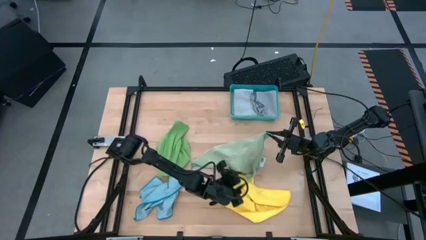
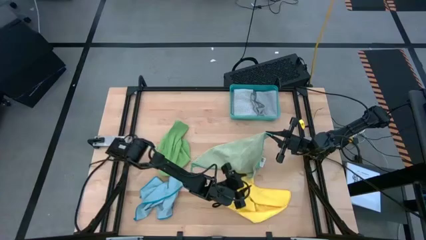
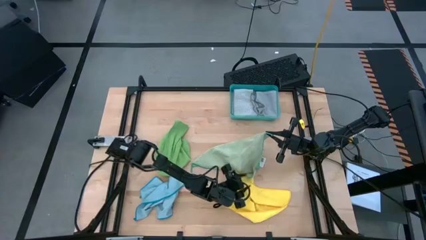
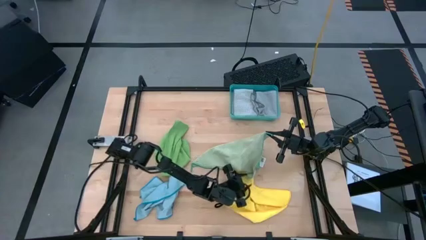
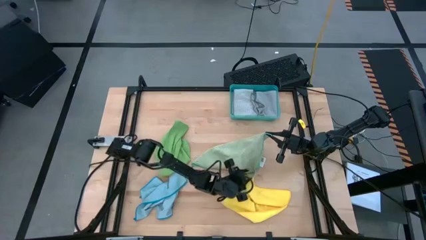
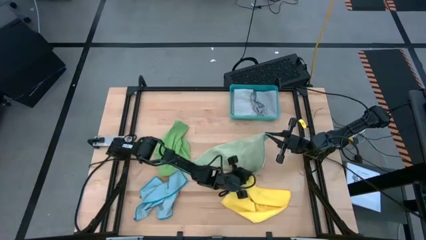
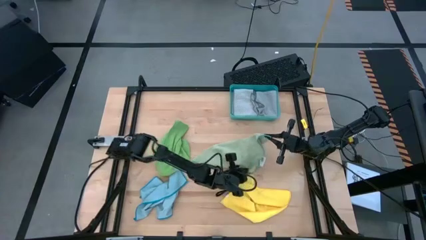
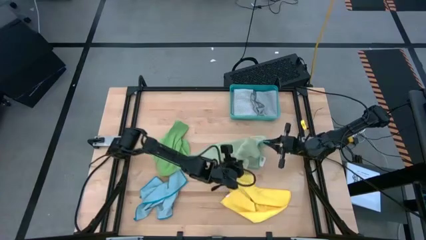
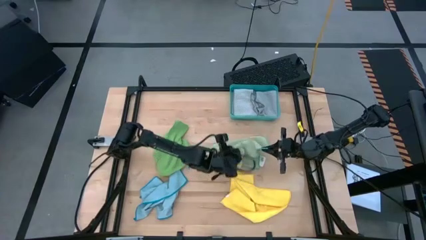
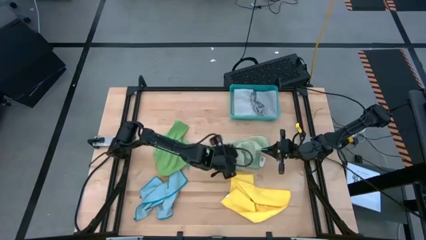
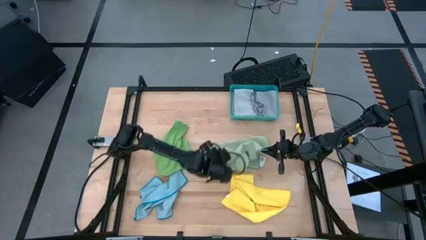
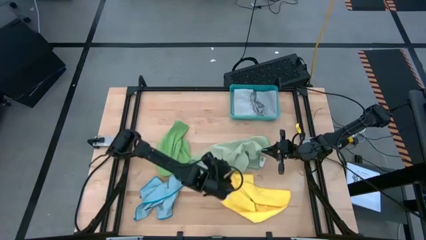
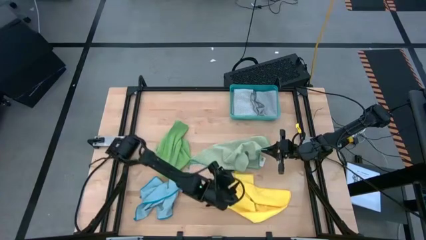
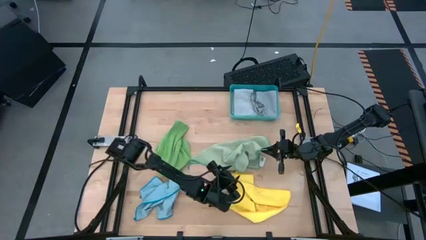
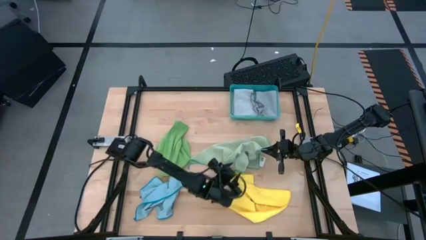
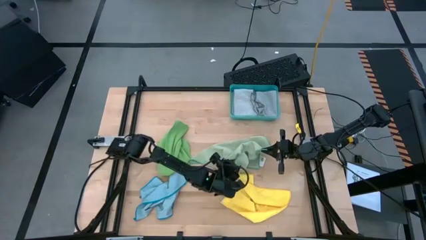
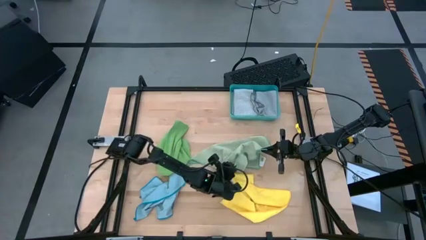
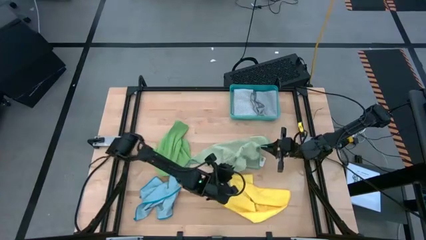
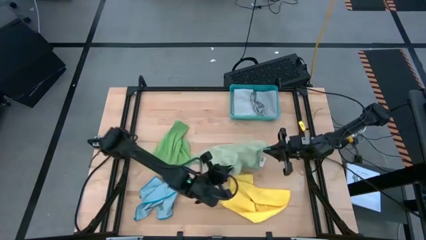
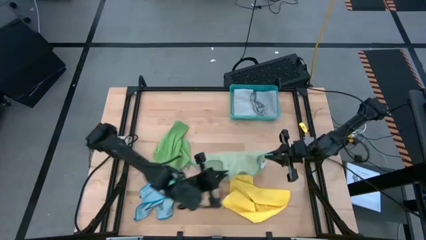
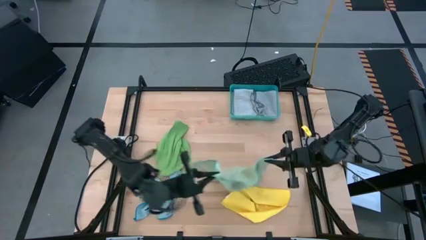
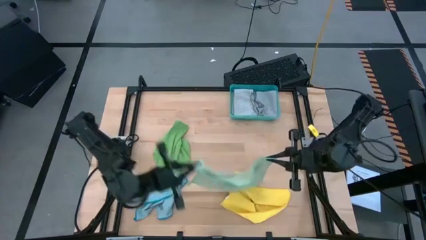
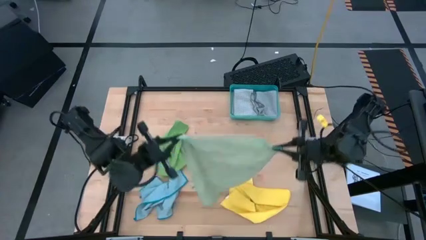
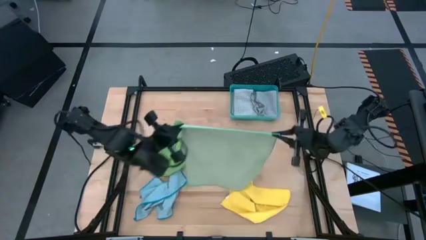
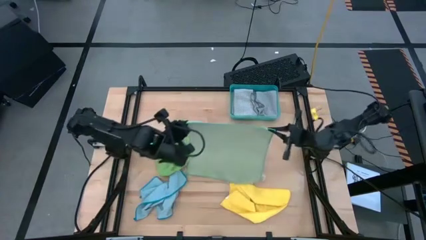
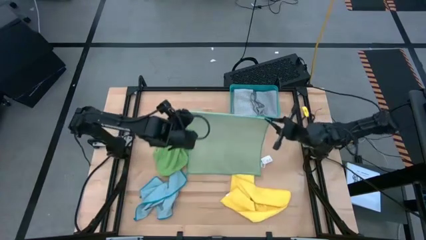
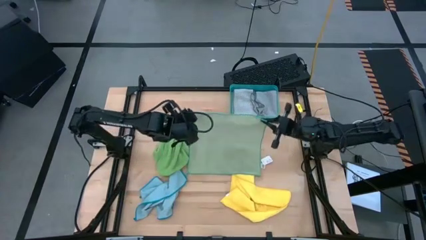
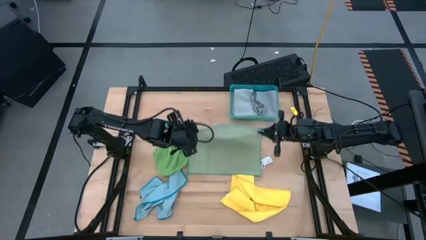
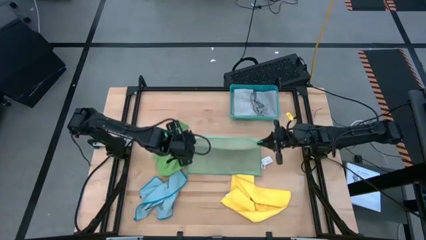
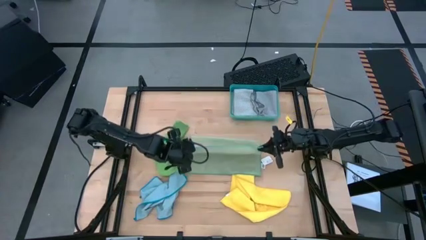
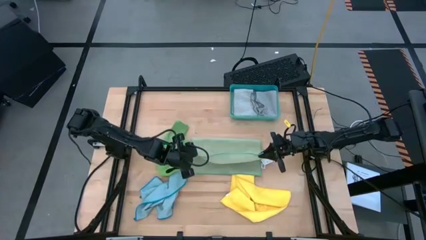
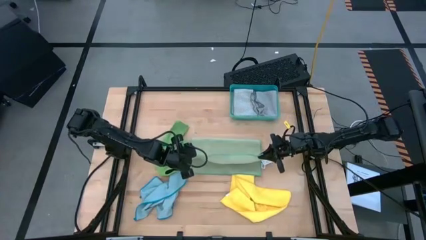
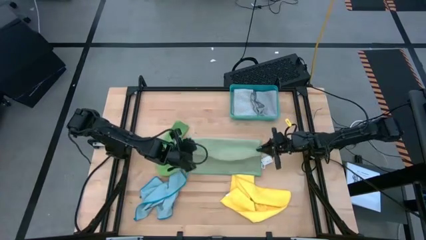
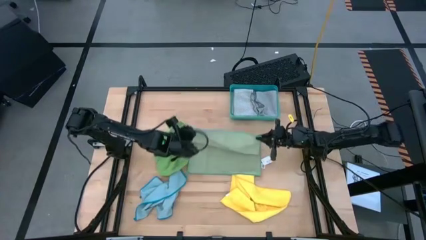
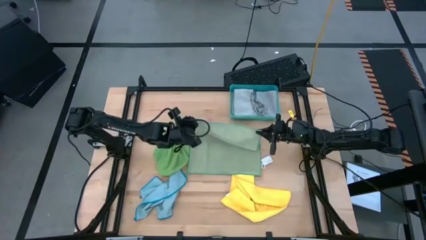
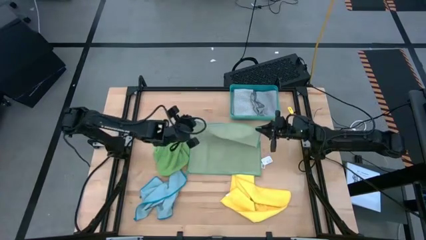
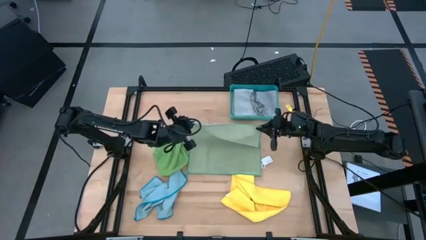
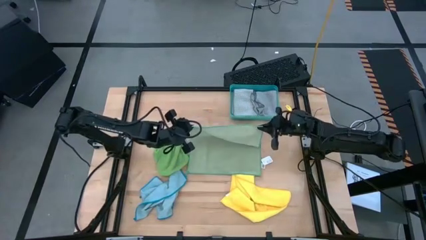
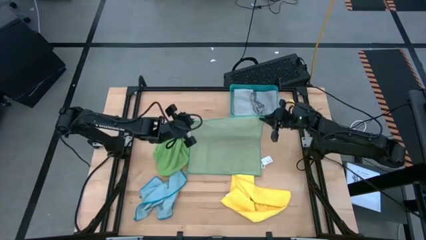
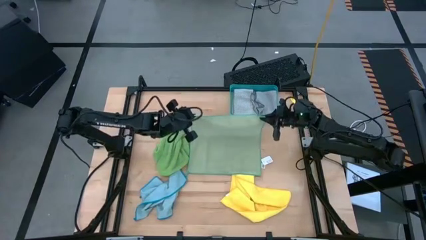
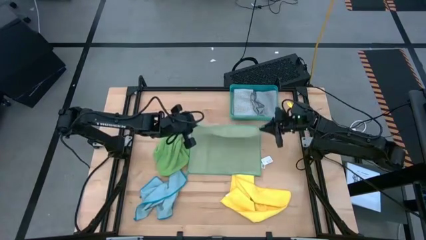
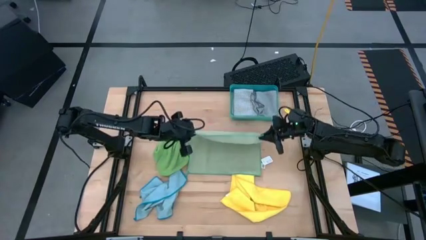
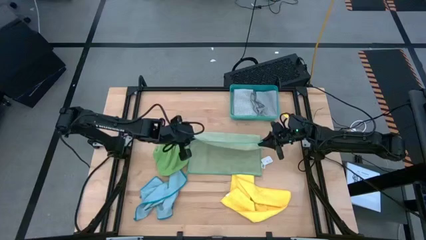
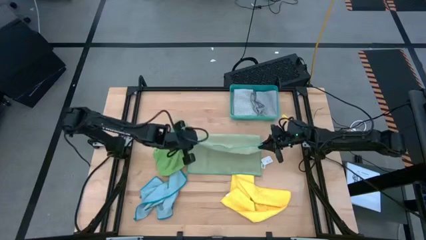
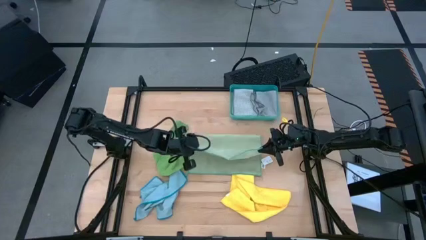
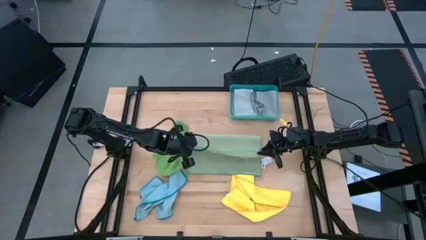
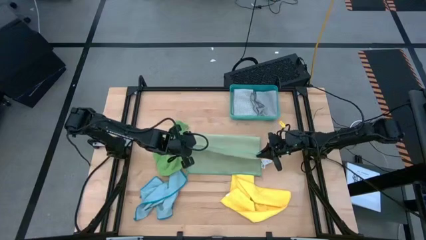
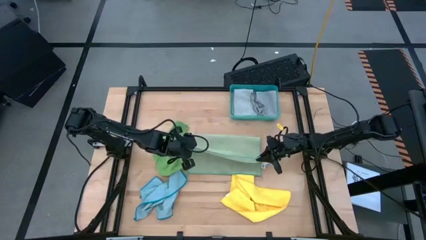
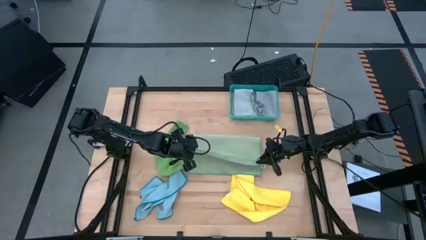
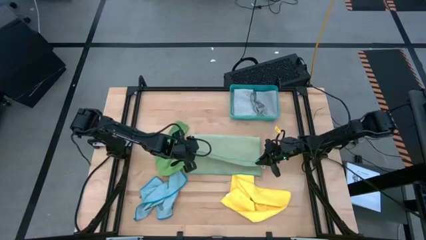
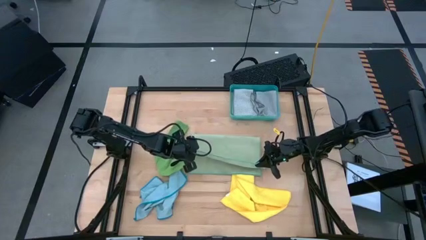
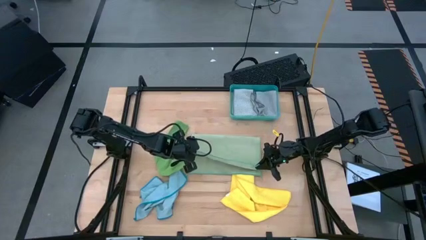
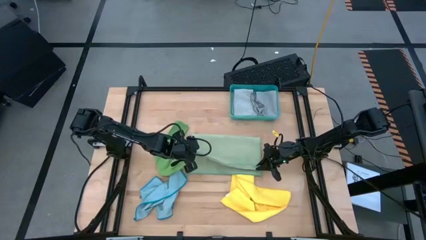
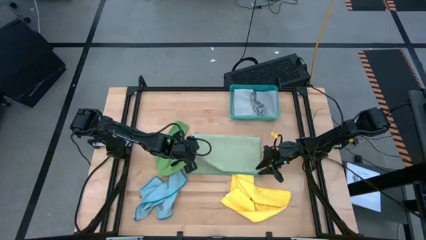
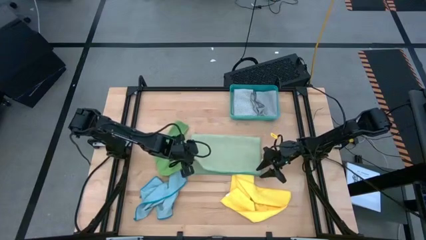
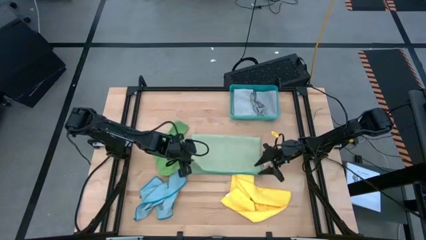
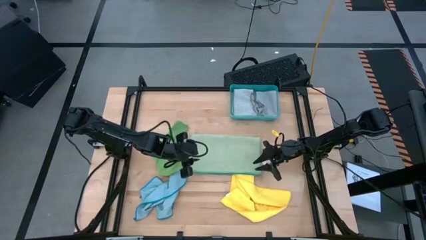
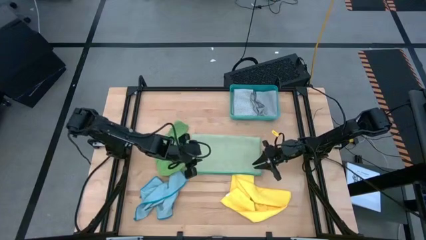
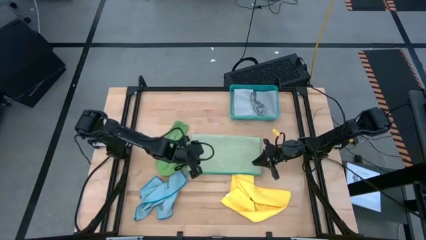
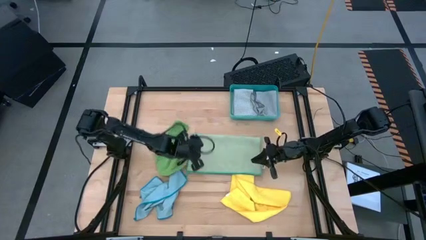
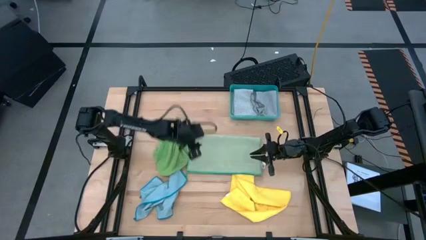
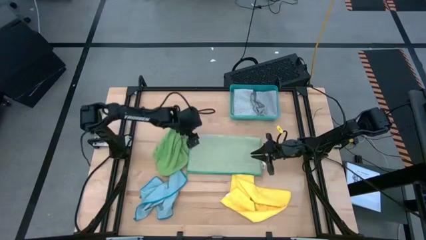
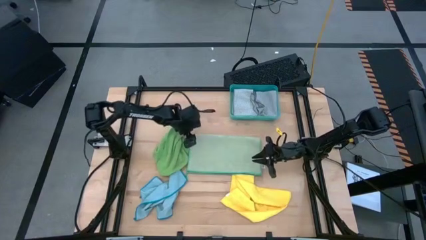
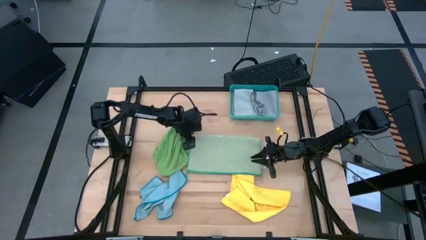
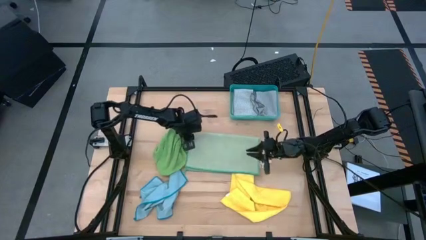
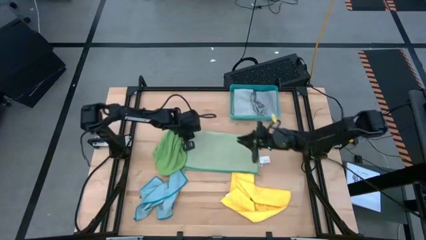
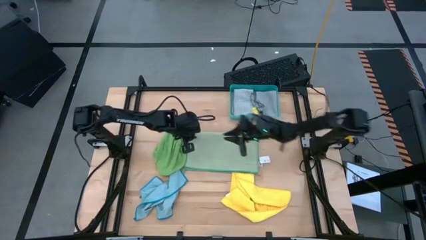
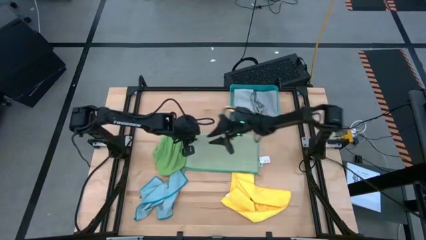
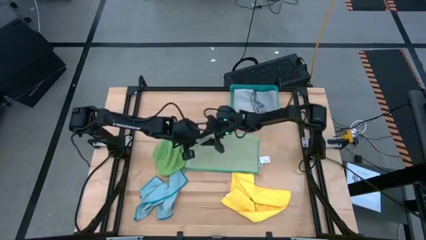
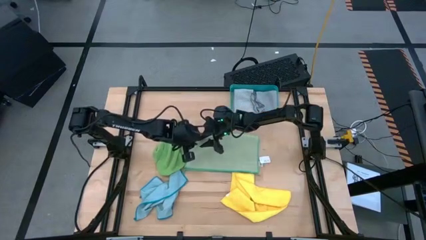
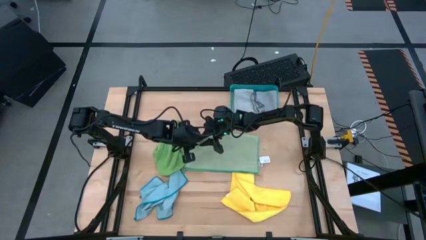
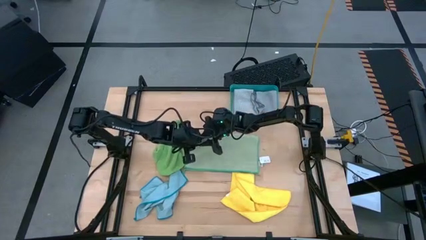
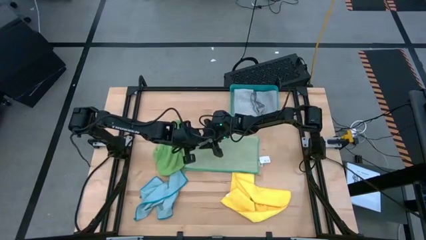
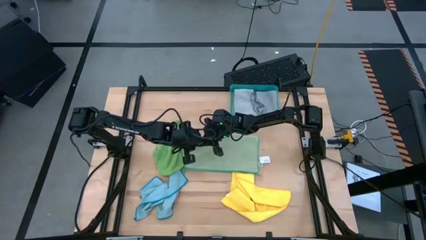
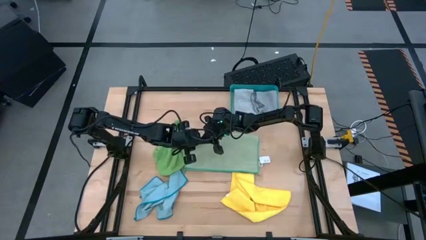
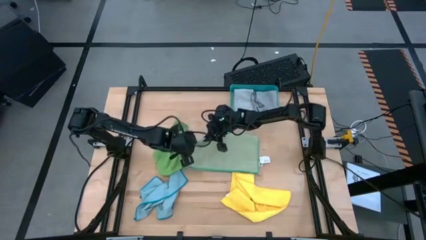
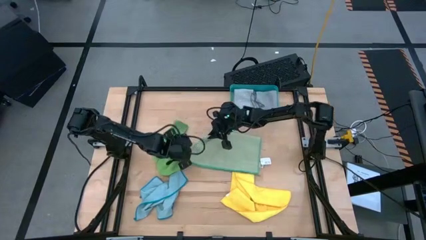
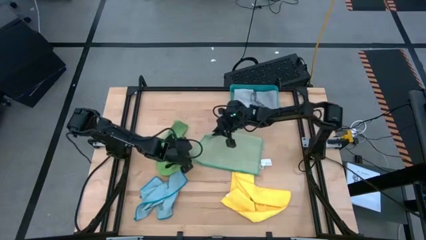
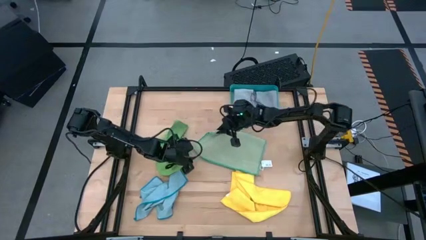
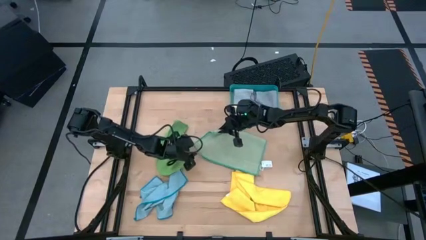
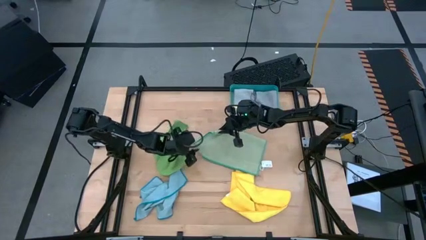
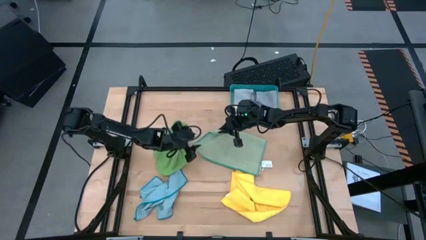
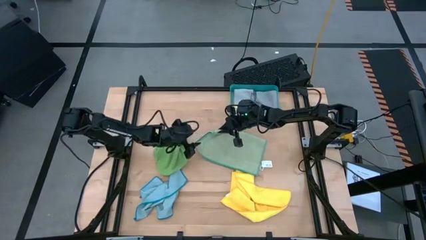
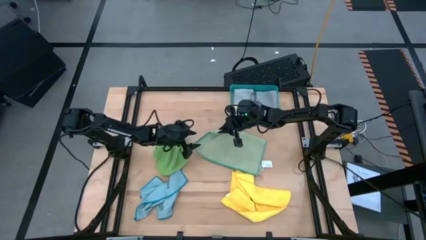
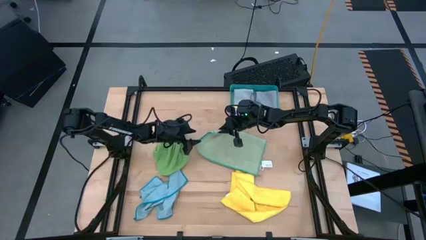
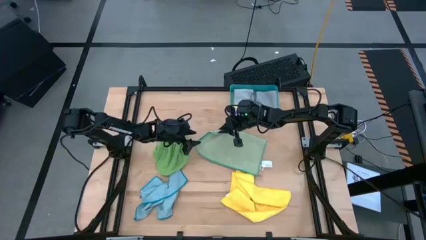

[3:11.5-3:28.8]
Task: Fold microfiber towels
Fold the light green microfiber cloth
